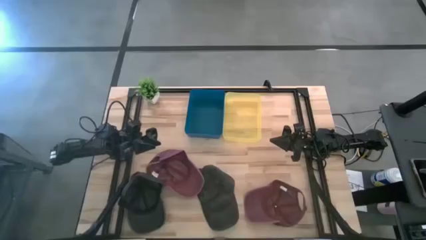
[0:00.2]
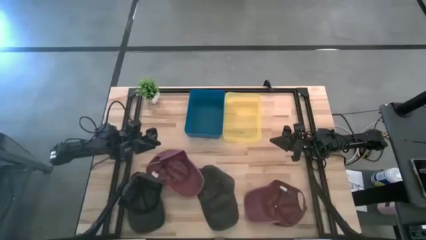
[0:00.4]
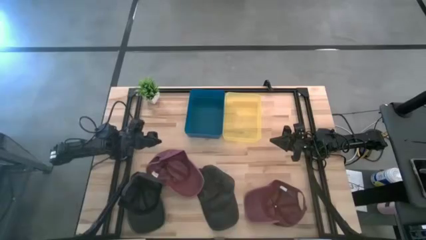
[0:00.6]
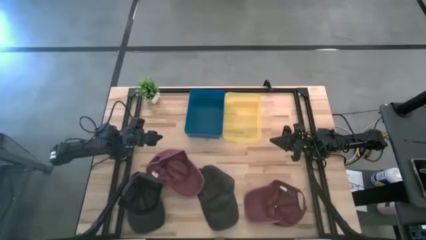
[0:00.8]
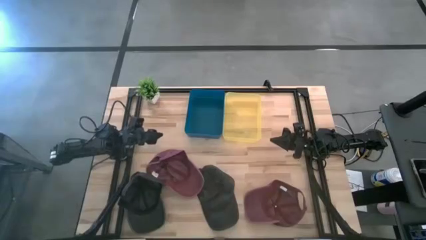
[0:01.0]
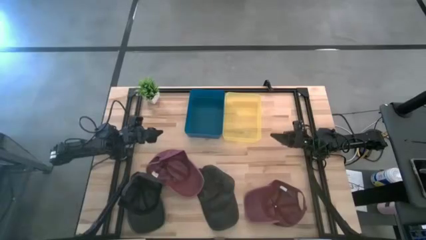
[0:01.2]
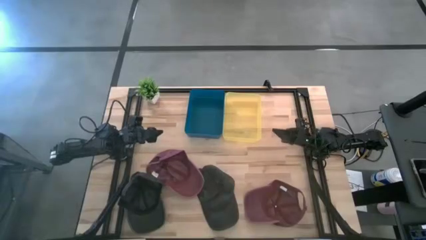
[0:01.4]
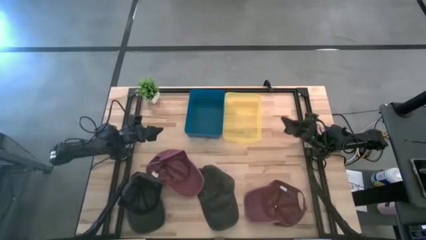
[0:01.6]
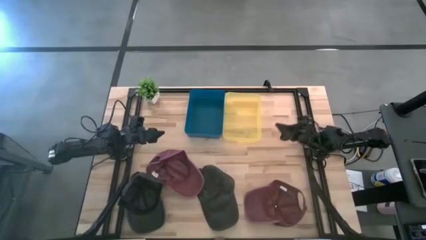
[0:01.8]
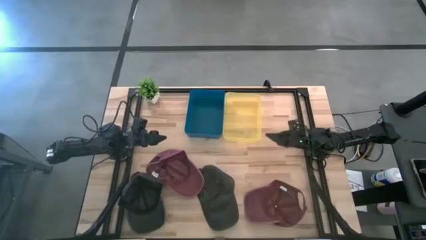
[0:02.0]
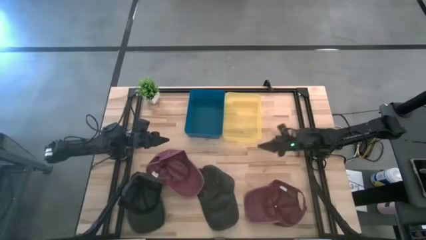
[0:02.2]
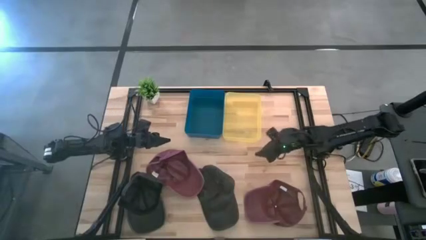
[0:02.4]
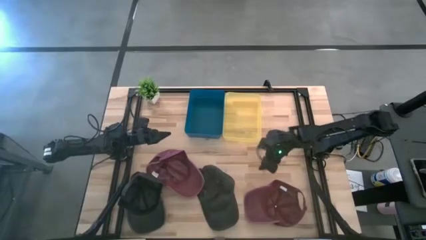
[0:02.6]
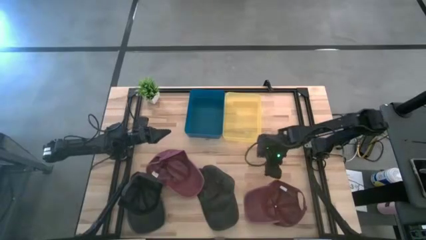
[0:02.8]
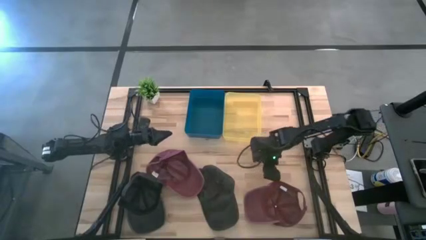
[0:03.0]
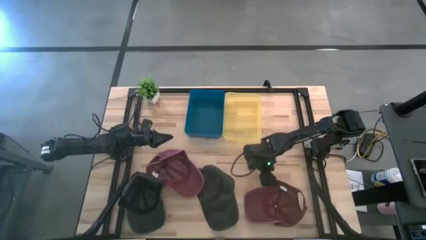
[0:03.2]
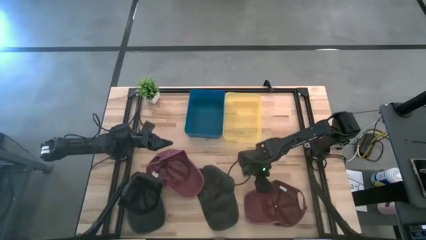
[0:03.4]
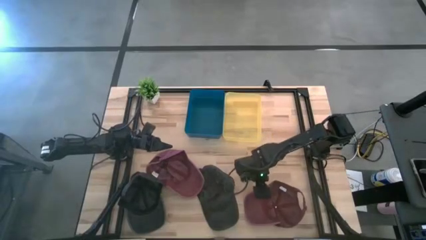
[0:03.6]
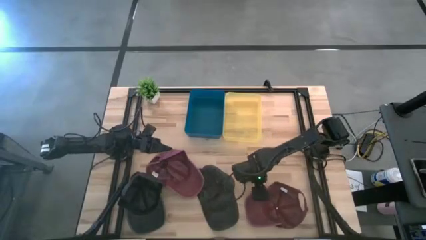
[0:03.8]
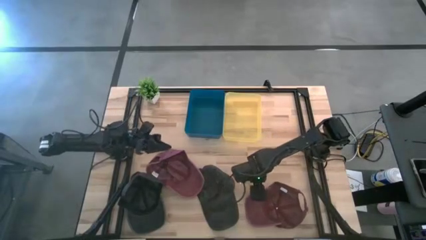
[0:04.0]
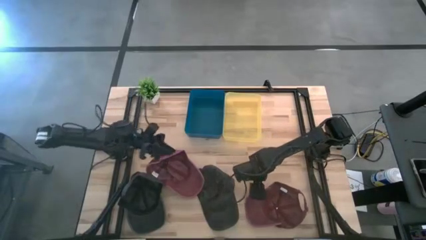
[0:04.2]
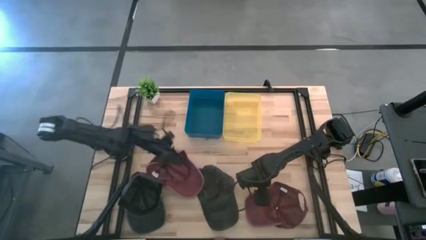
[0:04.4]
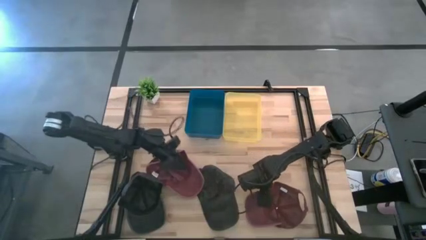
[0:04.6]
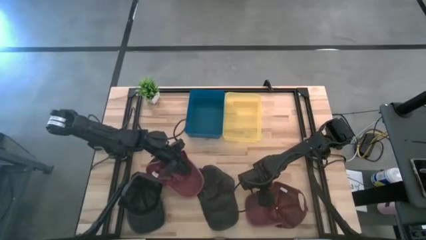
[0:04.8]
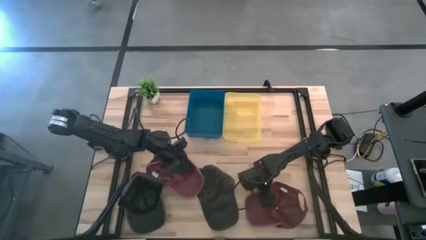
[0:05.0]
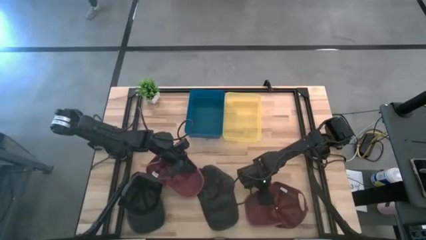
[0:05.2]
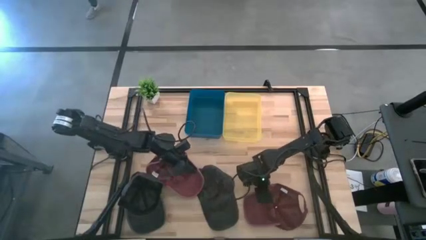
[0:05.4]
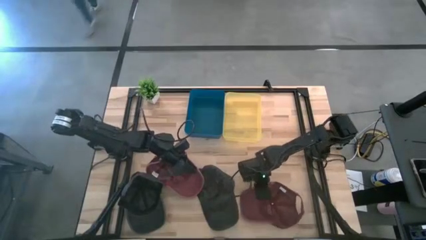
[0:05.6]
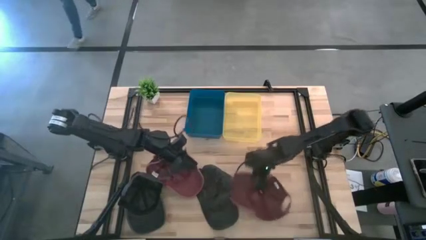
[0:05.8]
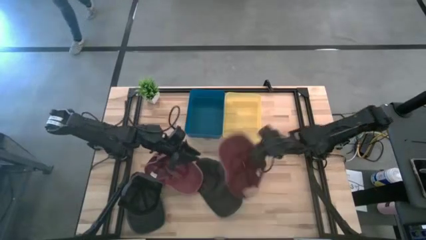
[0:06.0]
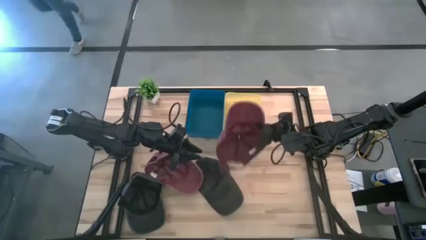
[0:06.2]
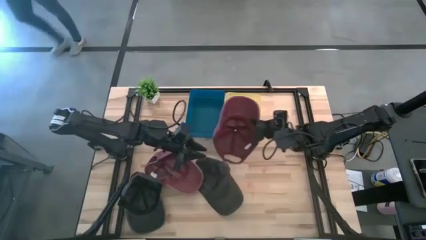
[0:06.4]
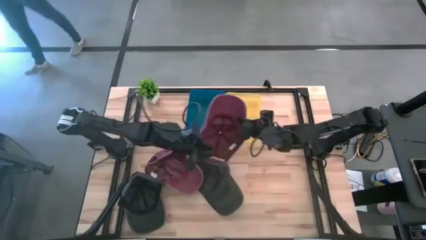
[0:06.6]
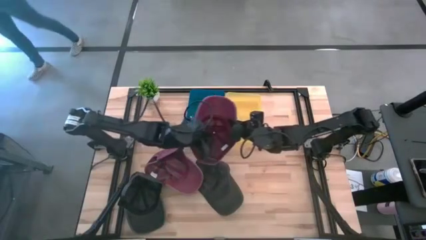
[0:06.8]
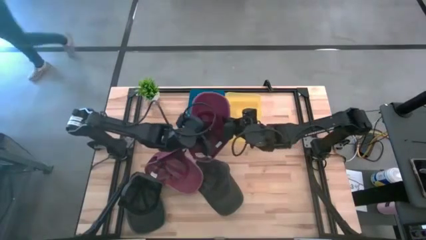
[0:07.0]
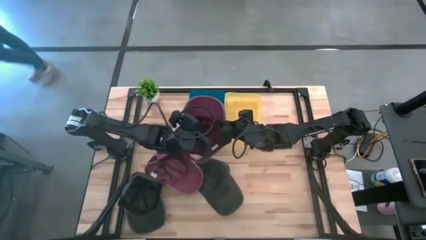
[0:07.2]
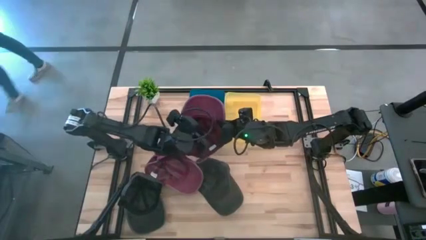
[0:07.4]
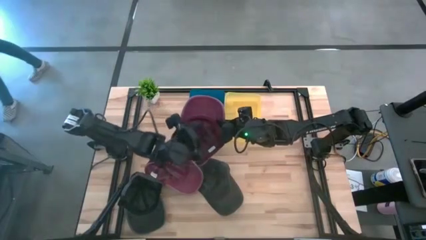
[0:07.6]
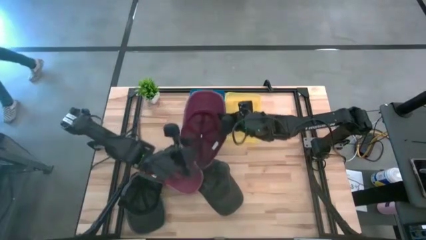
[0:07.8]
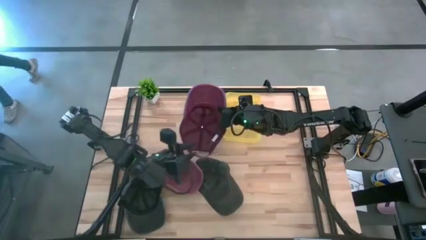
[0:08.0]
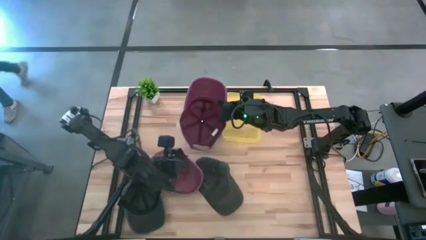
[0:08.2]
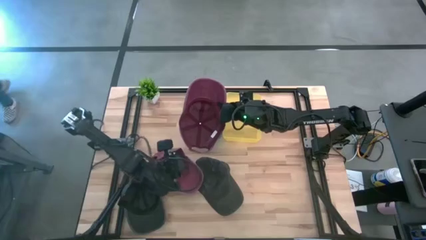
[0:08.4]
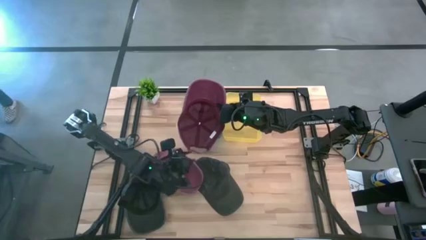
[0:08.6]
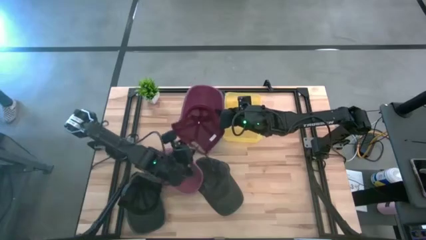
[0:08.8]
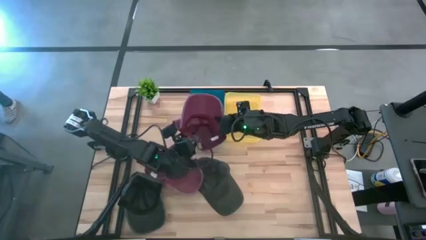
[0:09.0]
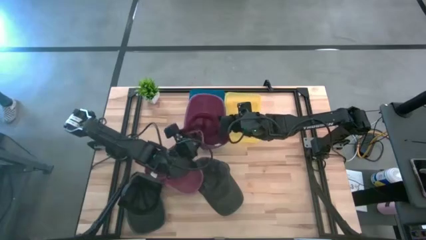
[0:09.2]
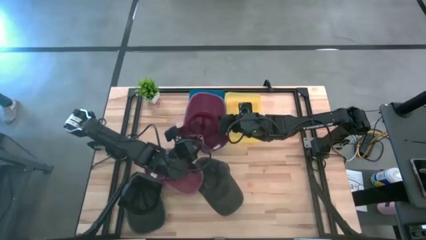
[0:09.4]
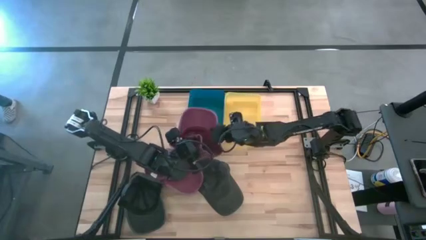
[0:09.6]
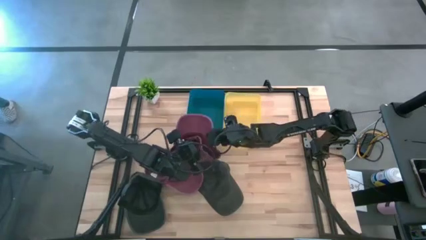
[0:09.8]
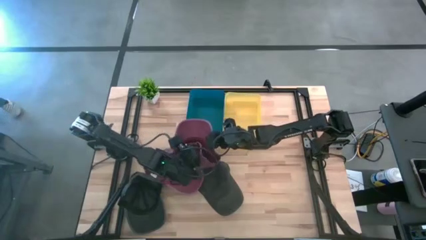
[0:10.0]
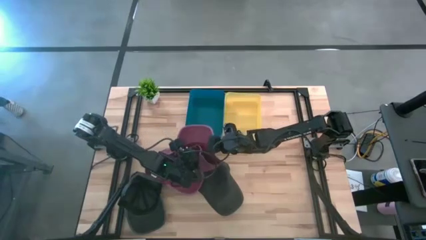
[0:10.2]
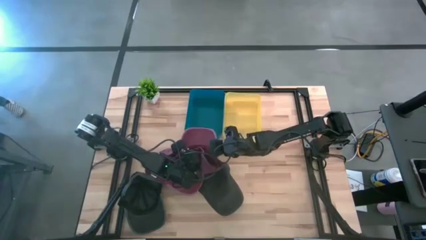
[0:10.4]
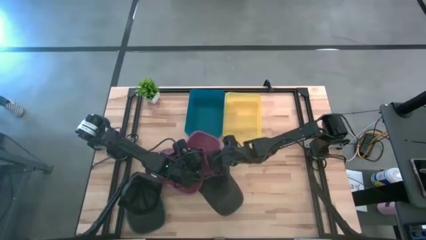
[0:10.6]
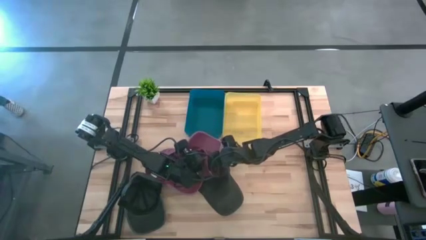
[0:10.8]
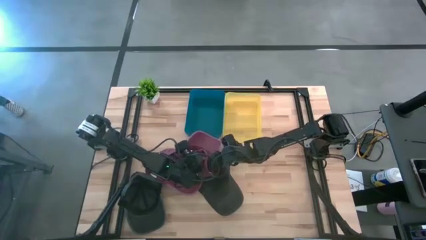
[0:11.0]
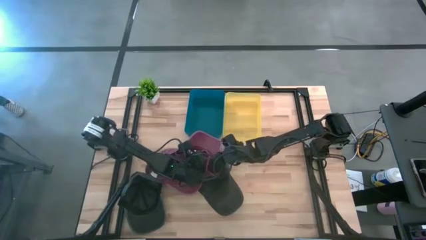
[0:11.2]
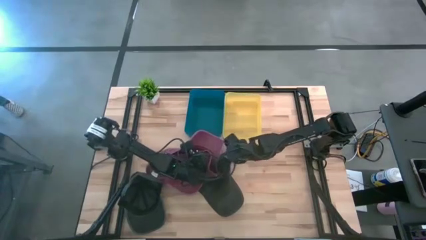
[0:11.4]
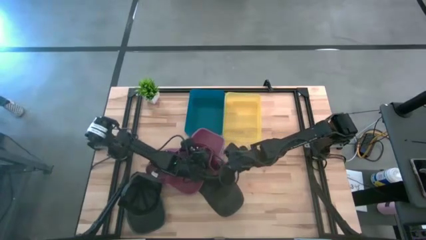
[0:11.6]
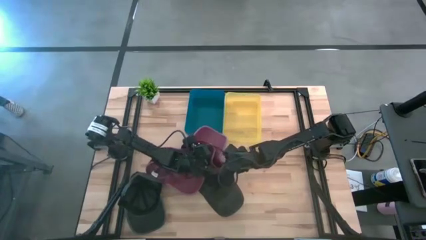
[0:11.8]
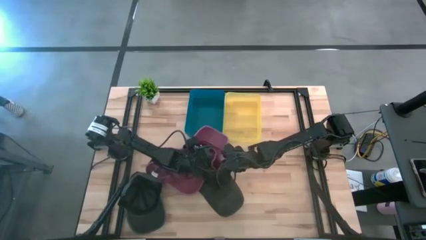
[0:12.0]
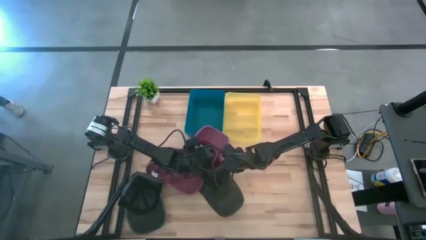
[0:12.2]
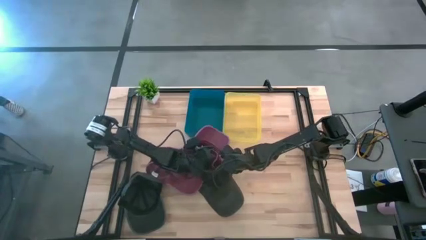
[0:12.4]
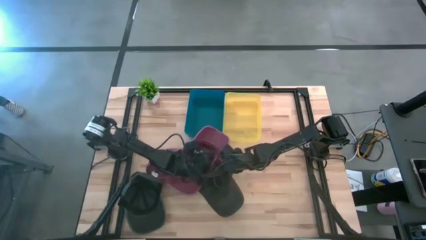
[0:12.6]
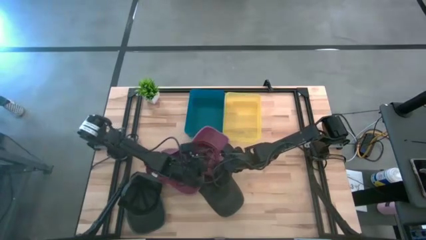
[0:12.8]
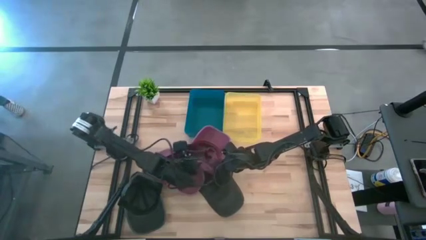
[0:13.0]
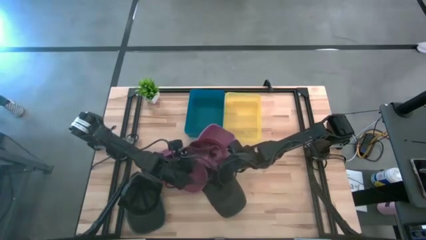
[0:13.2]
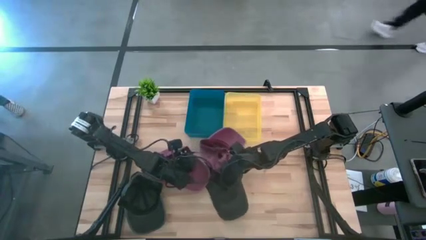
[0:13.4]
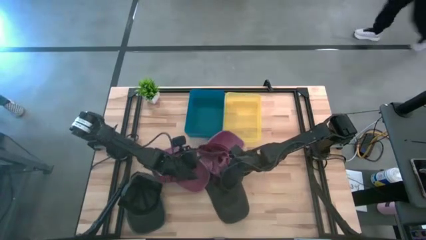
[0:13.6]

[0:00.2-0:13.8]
Task: Pick & Place hat
Put the bottom red cap into the blue bin
